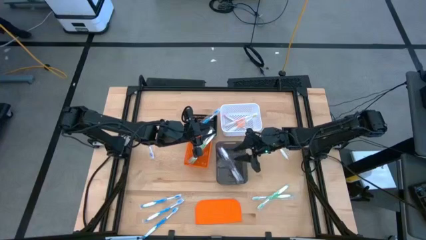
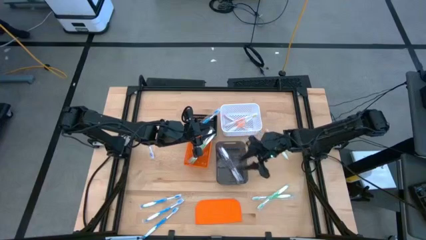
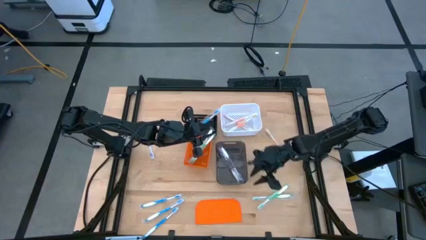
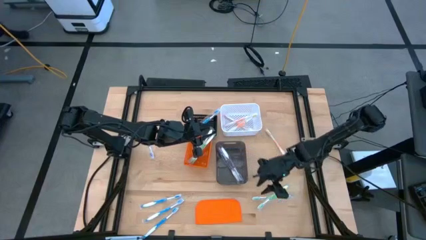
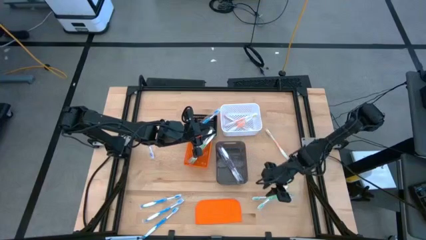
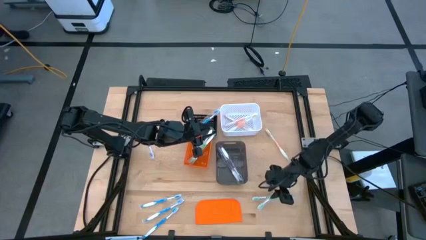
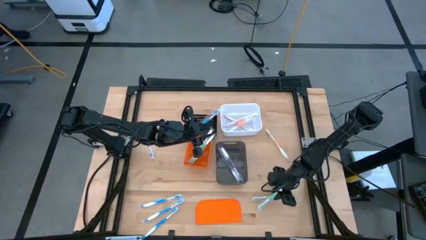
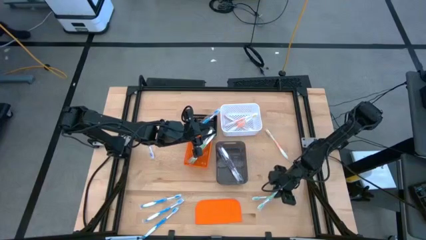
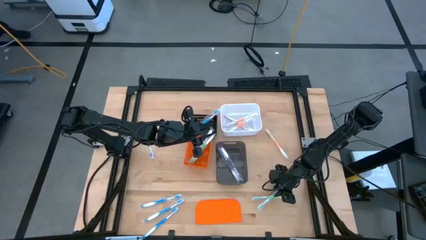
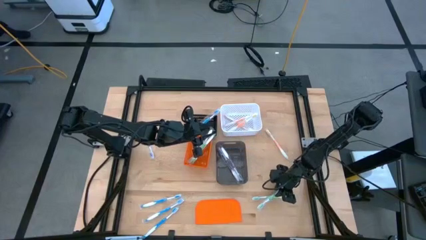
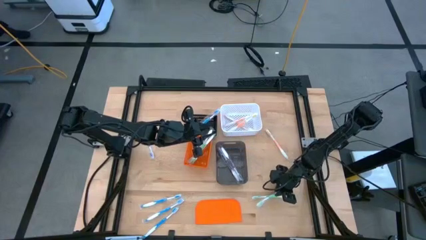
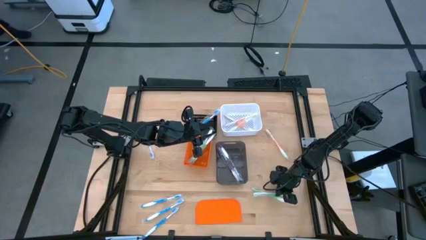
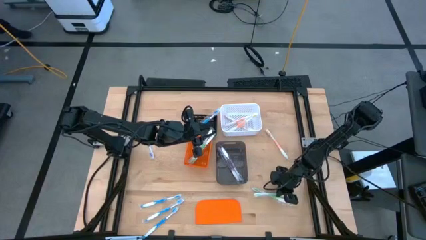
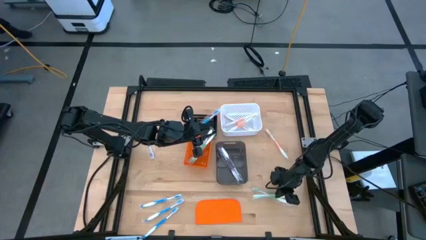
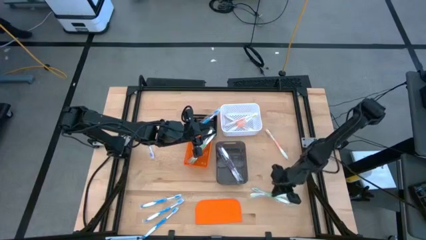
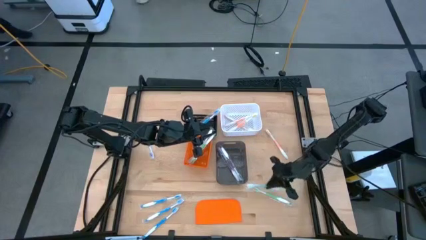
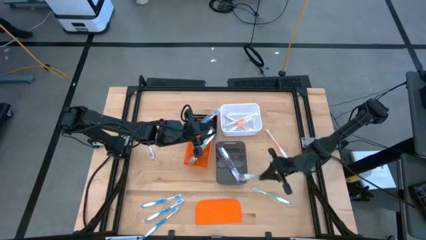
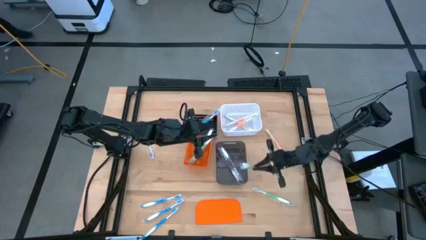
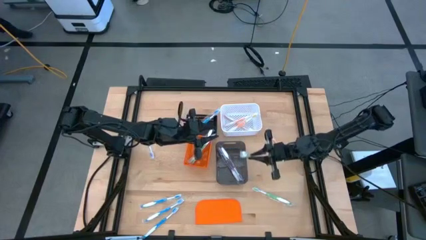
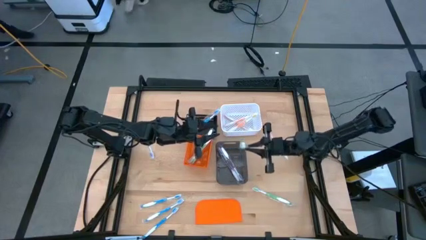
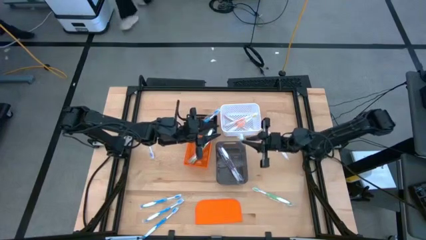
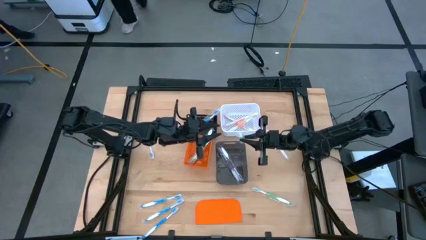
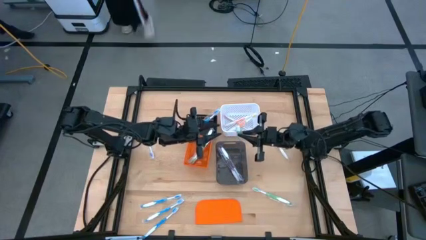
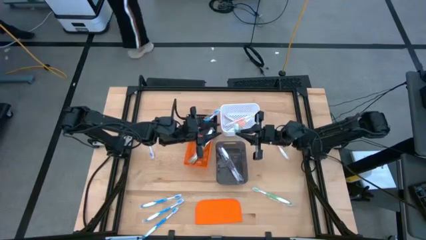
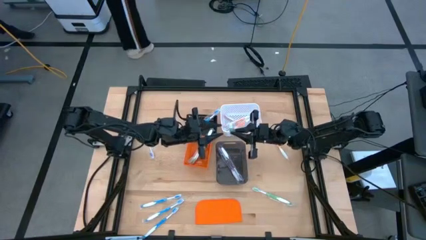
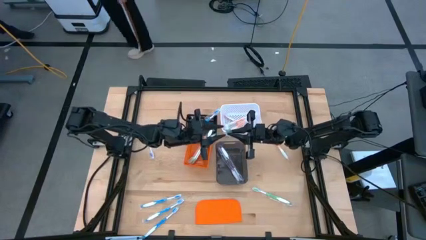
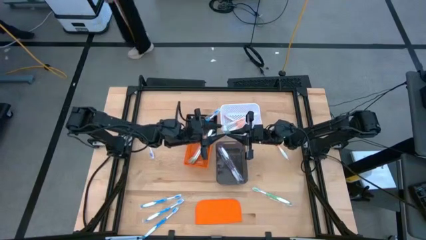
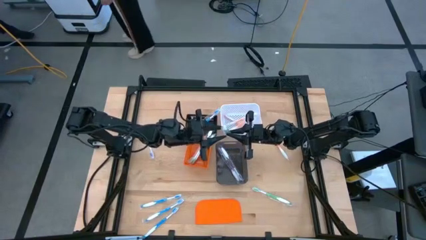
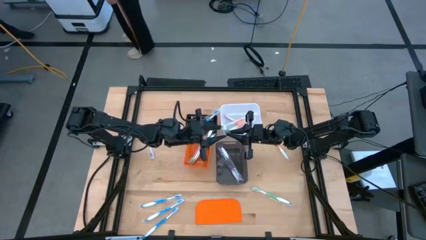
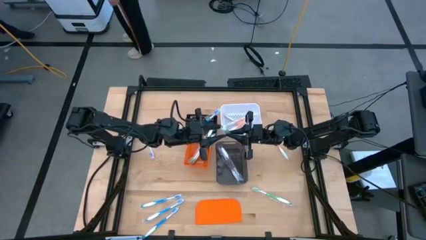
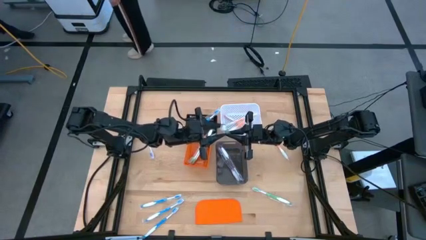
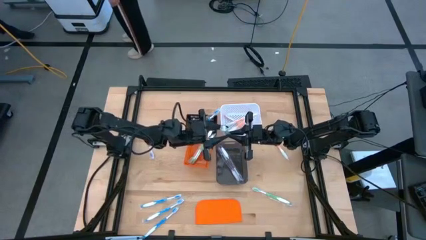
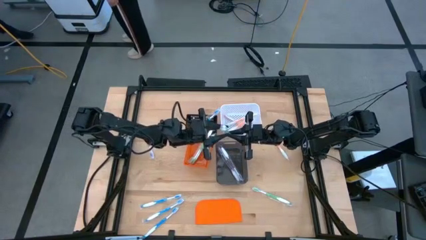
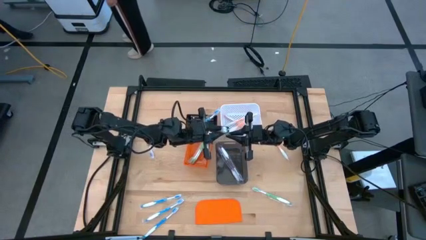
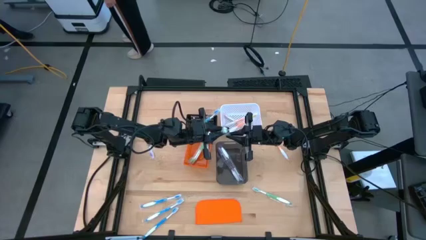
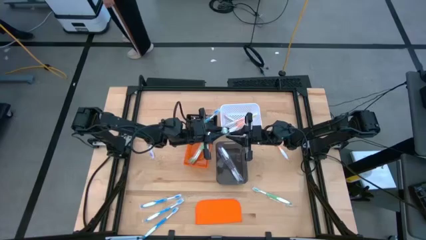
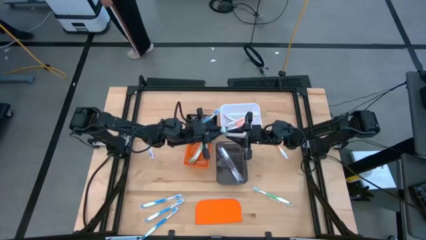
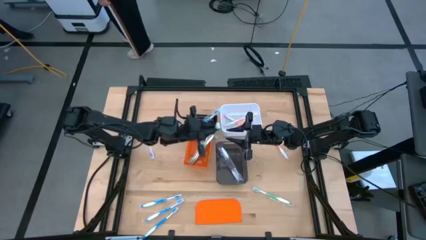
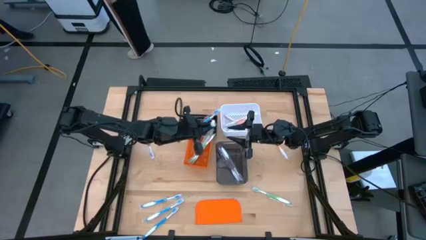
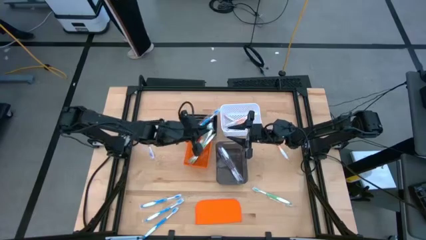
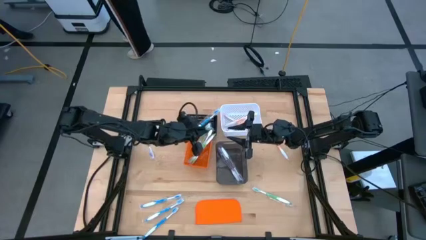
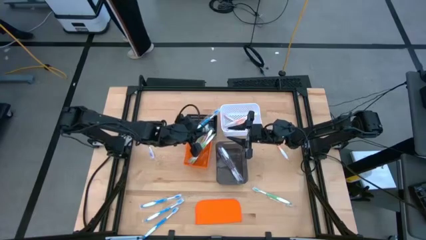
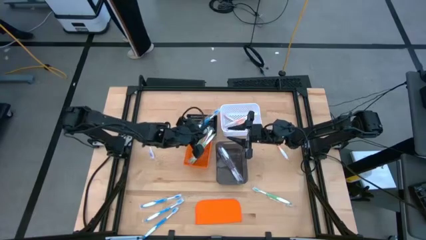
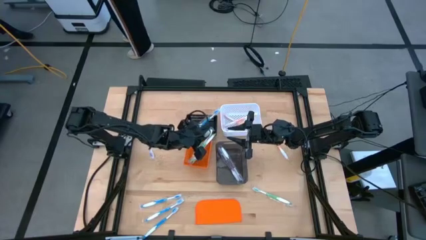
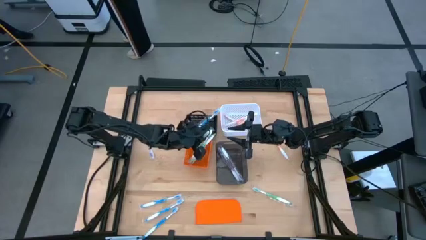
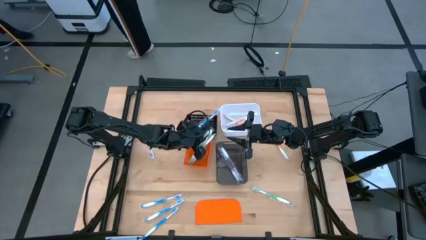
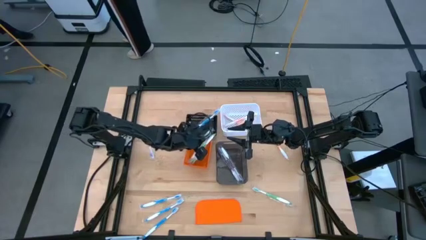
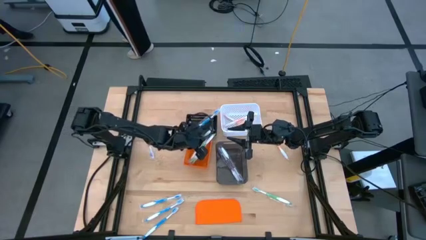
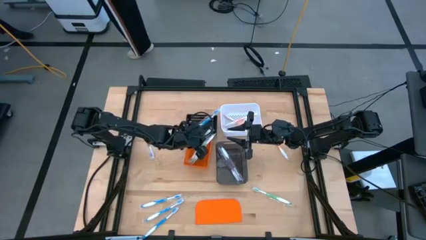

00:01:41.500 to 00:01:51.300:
Task: Pick & Place Toothbrushes
Put the green toothbrush into the orange bin

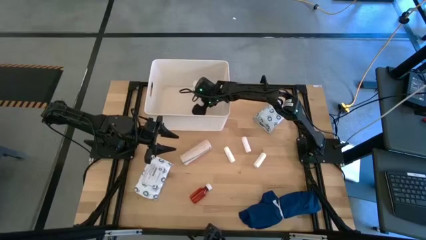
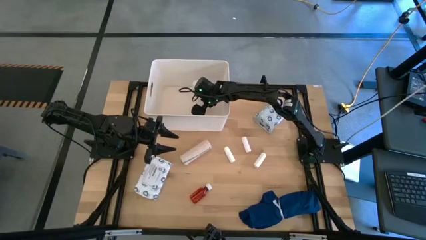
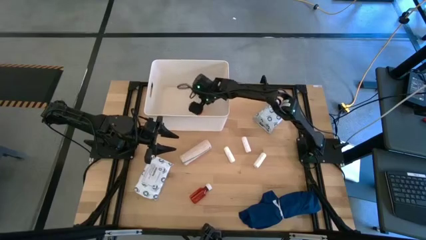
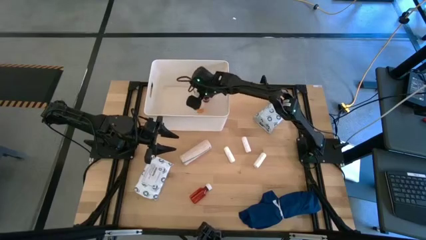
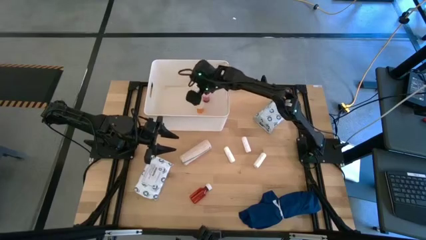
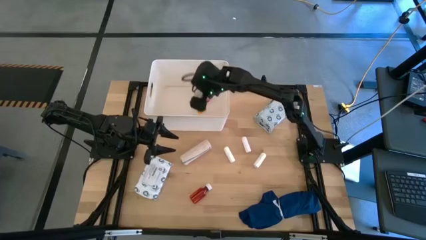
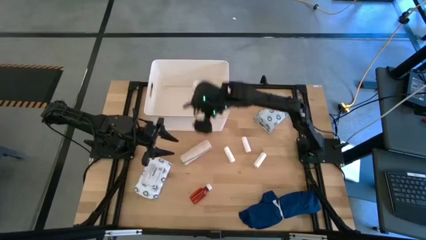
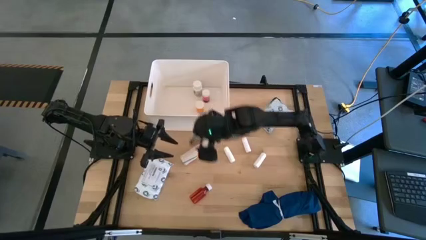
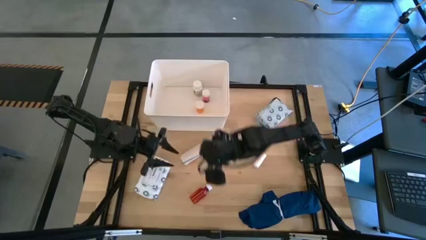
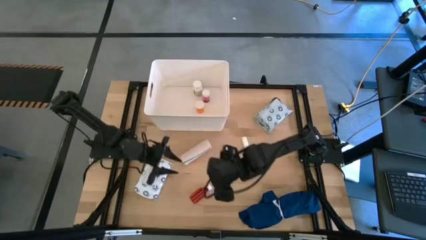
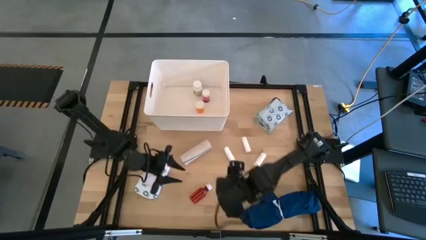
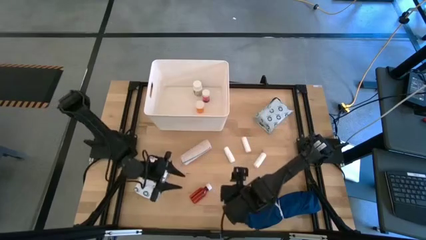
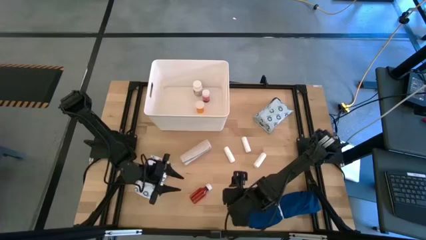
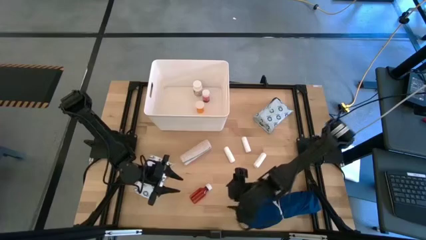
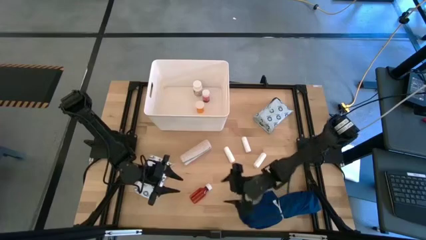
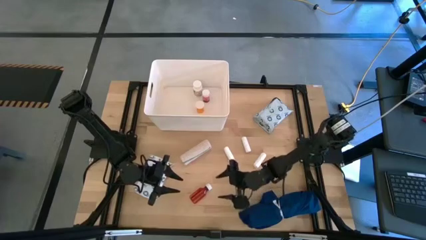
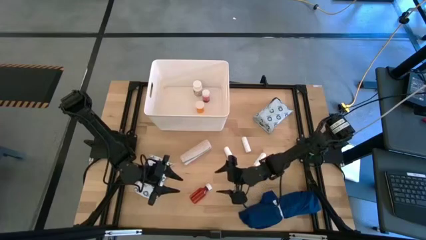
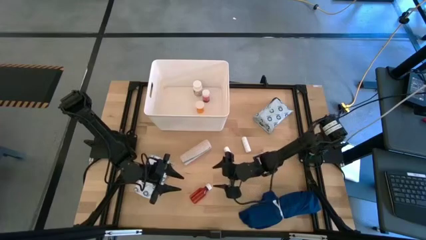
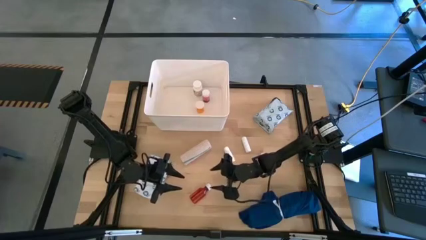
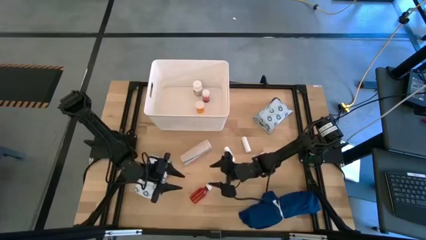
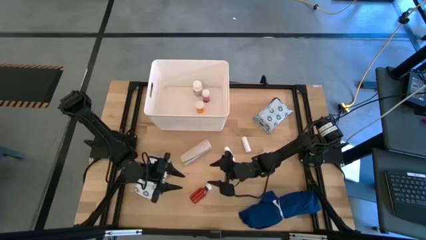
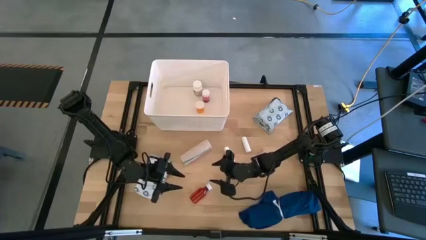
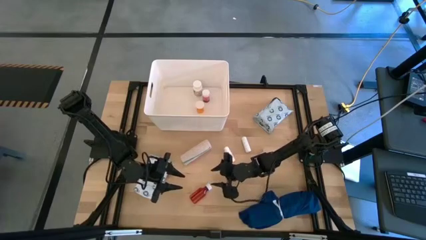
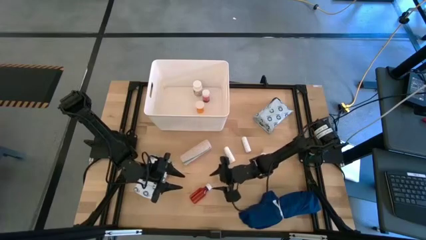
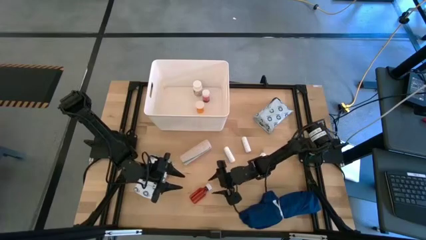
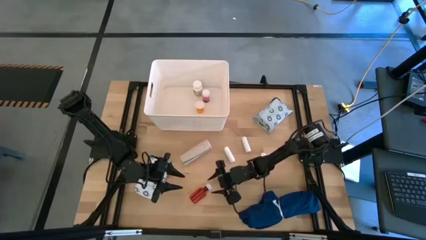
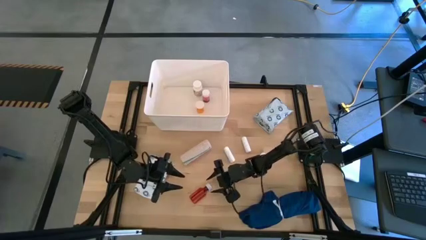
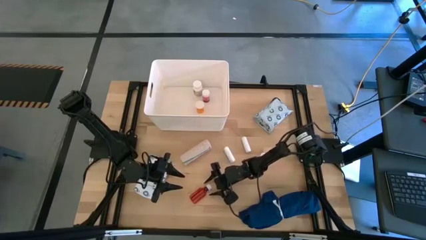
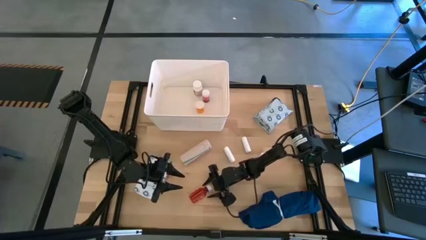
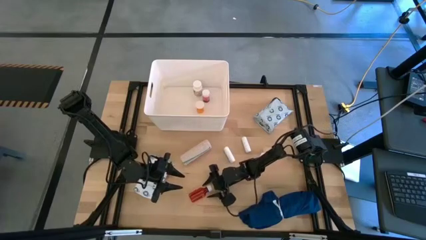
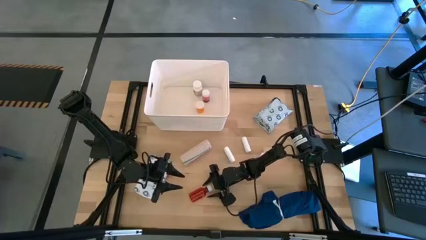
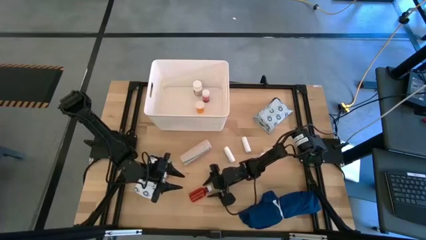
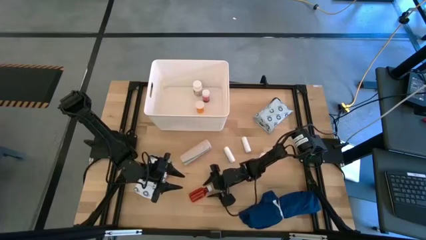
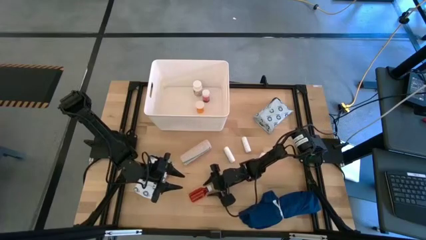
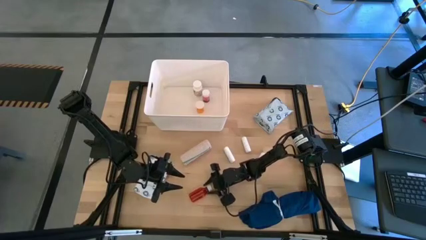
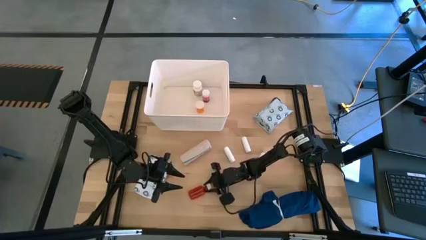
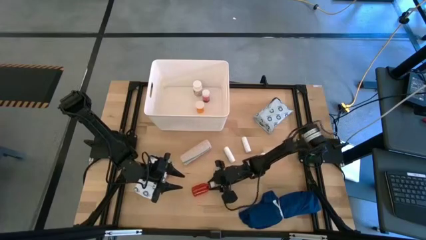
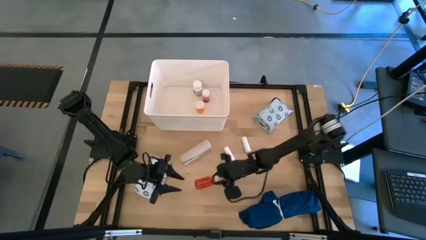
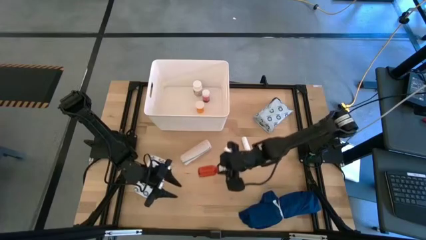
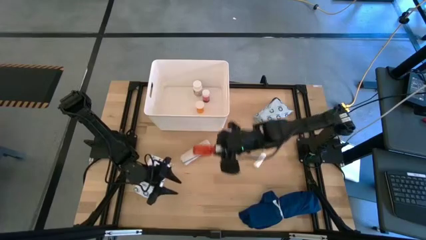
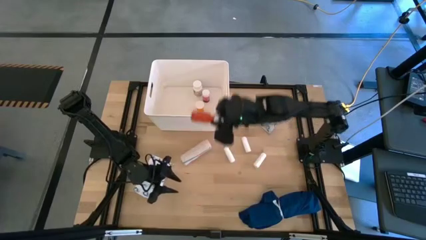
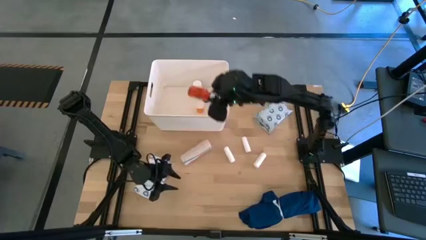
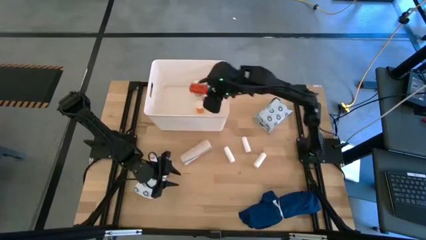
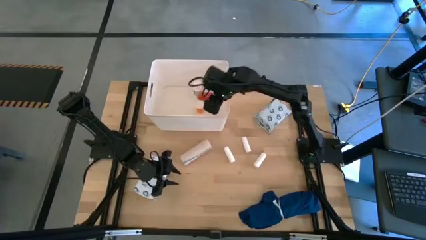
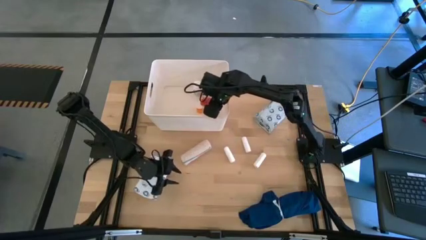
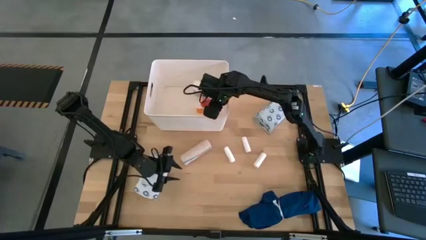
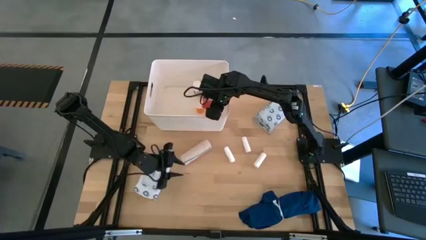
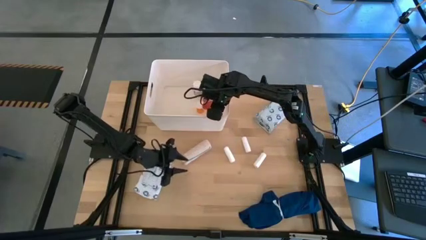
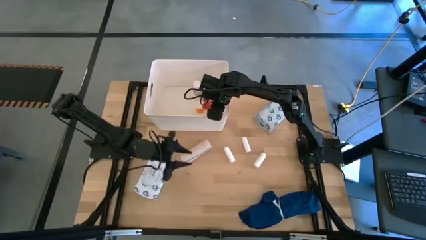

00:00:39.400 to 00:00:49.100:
Task: Pick & place medical supplies in basket/bin
Put the red medicine bottle into the white bin
